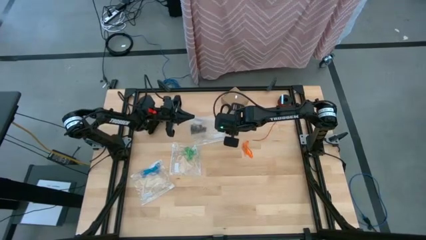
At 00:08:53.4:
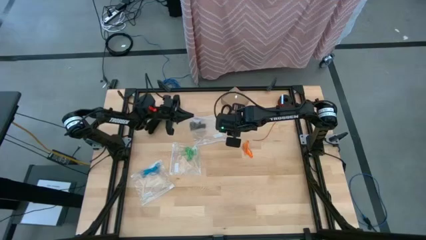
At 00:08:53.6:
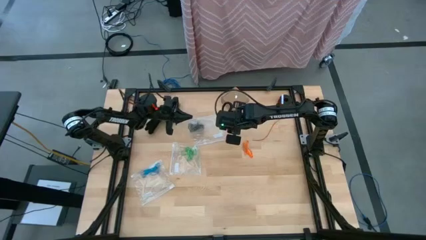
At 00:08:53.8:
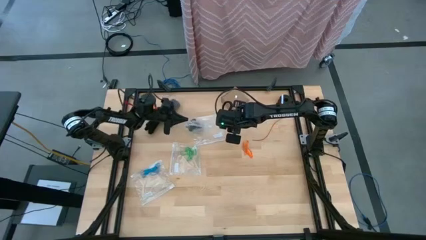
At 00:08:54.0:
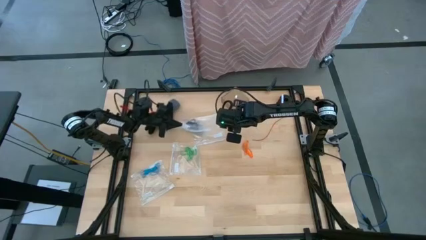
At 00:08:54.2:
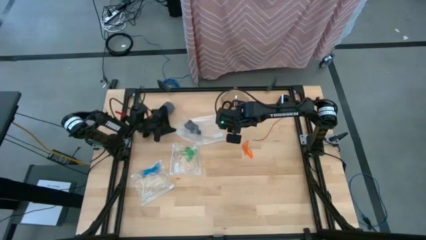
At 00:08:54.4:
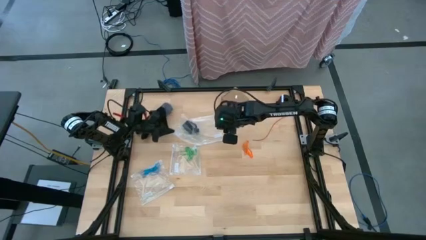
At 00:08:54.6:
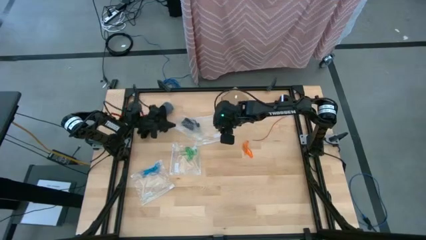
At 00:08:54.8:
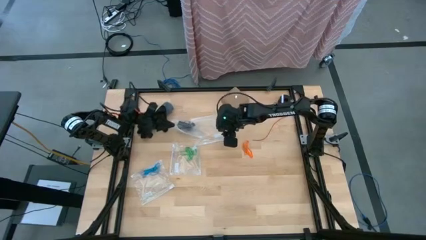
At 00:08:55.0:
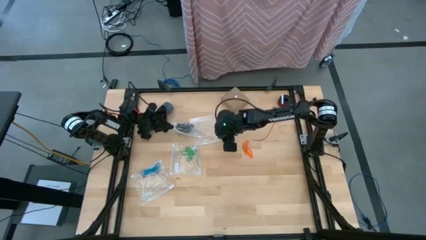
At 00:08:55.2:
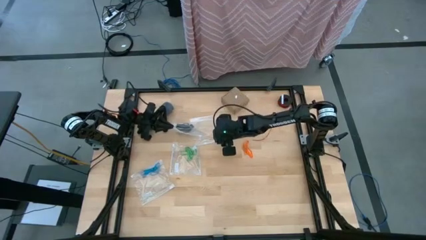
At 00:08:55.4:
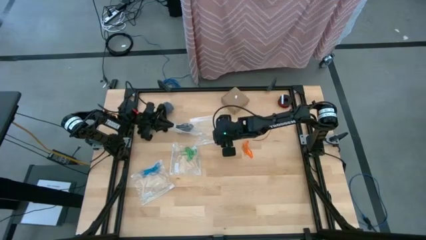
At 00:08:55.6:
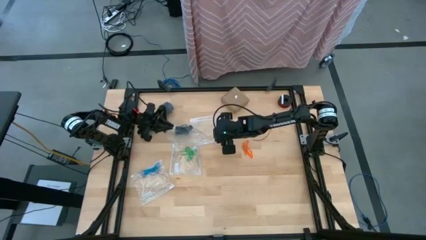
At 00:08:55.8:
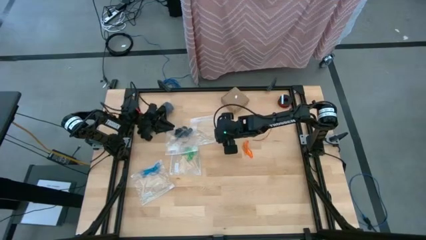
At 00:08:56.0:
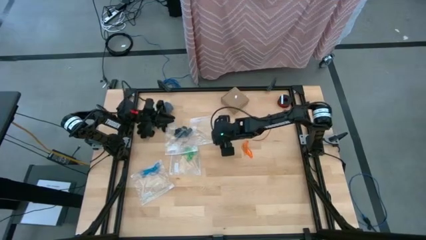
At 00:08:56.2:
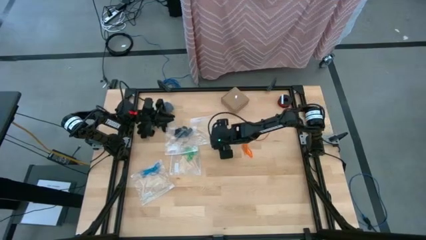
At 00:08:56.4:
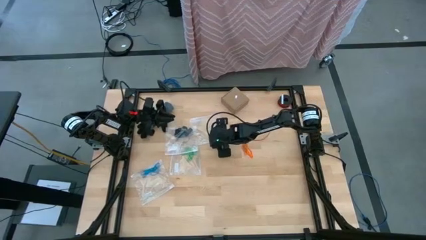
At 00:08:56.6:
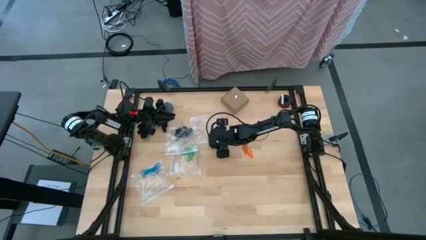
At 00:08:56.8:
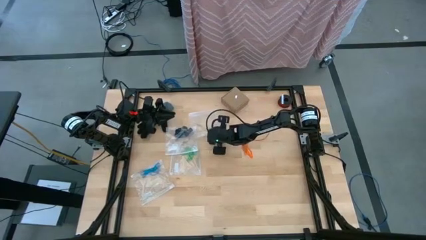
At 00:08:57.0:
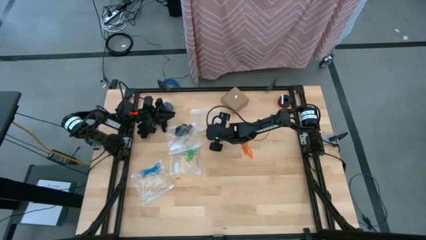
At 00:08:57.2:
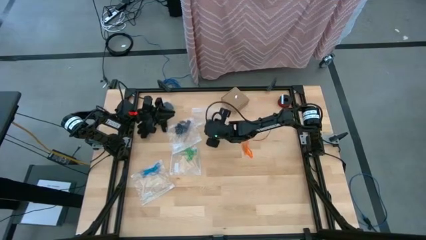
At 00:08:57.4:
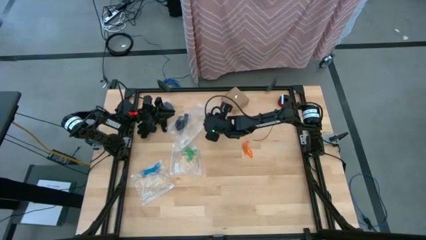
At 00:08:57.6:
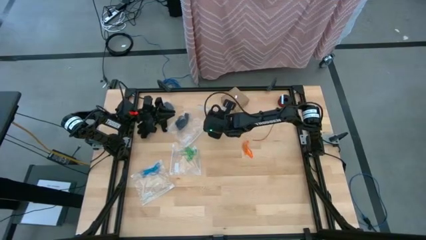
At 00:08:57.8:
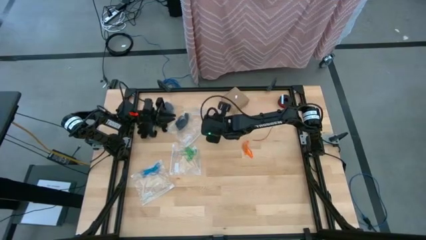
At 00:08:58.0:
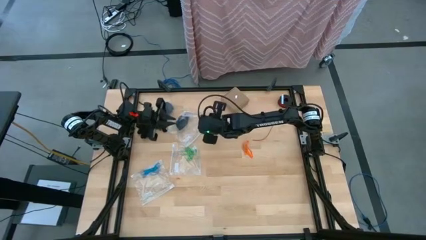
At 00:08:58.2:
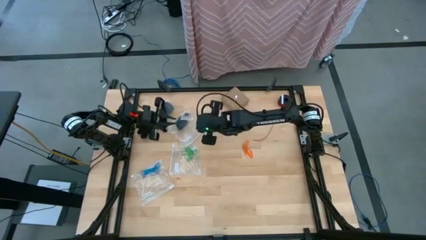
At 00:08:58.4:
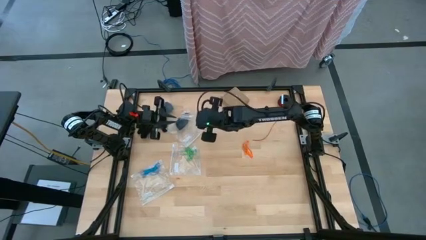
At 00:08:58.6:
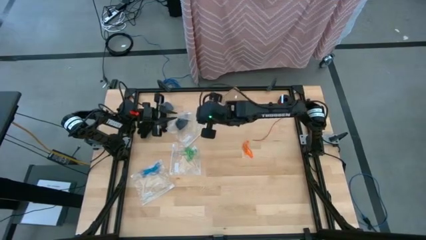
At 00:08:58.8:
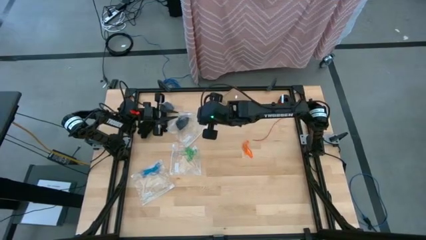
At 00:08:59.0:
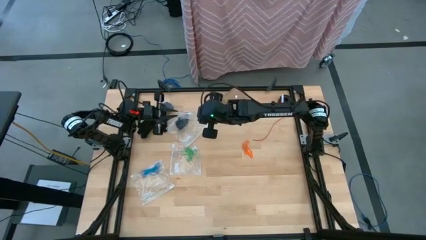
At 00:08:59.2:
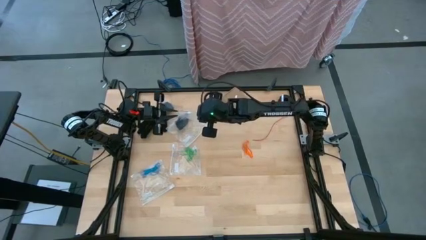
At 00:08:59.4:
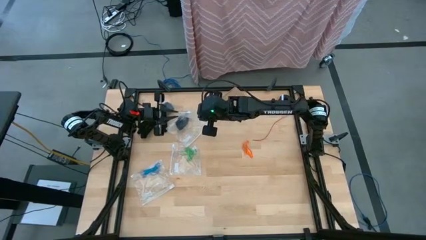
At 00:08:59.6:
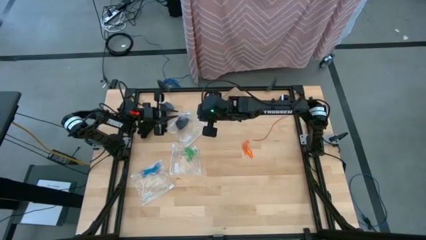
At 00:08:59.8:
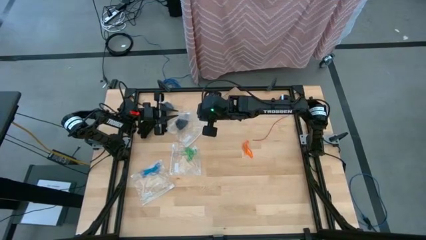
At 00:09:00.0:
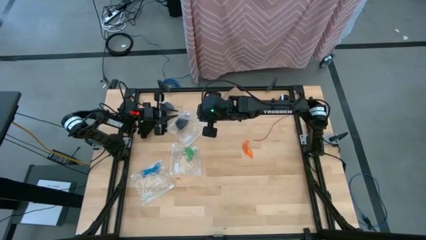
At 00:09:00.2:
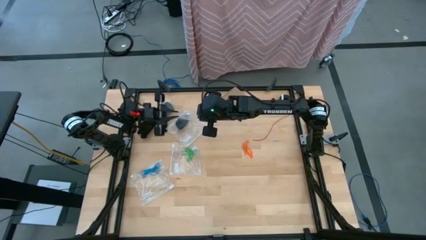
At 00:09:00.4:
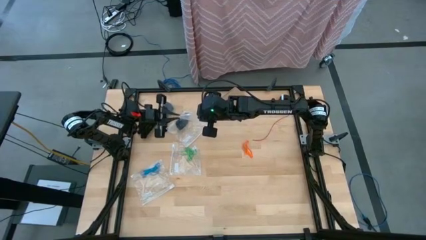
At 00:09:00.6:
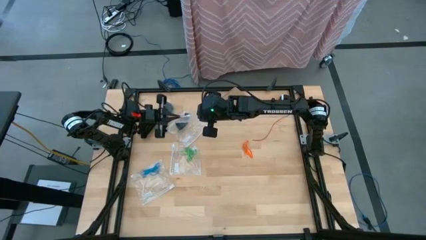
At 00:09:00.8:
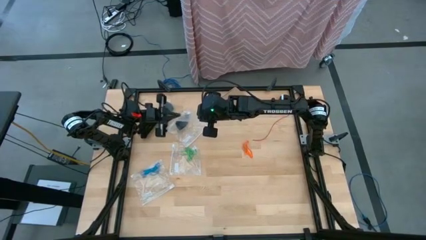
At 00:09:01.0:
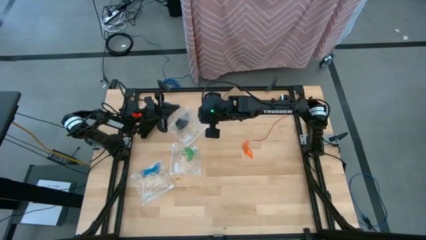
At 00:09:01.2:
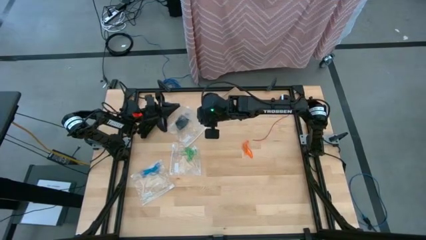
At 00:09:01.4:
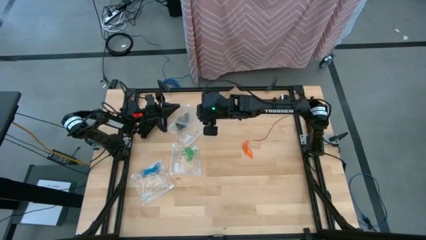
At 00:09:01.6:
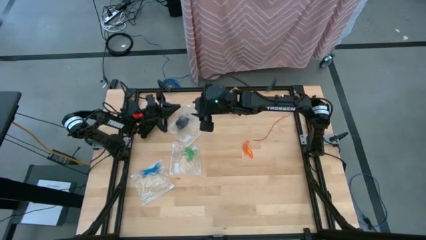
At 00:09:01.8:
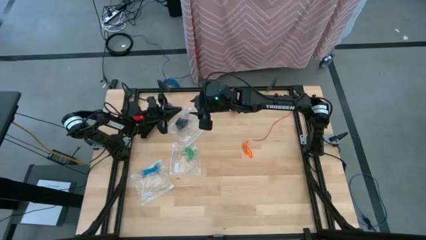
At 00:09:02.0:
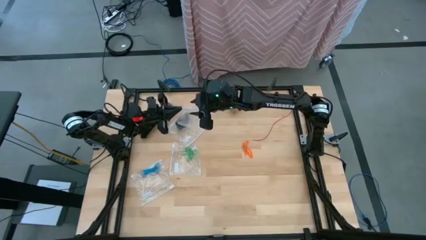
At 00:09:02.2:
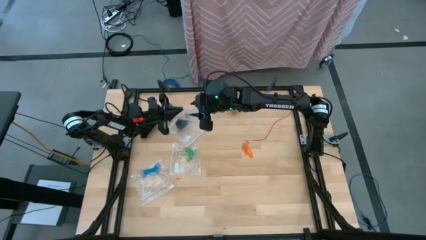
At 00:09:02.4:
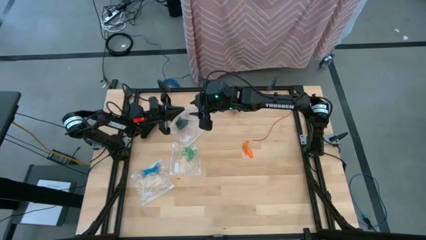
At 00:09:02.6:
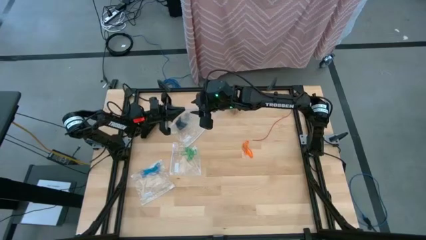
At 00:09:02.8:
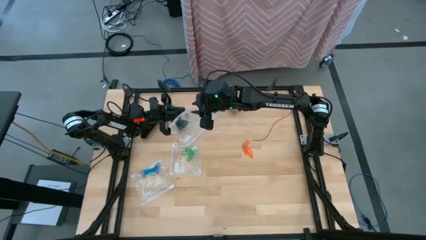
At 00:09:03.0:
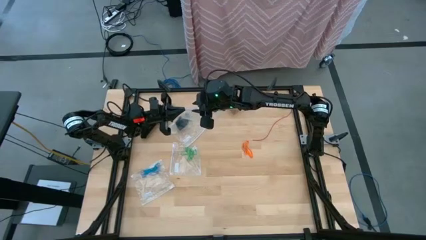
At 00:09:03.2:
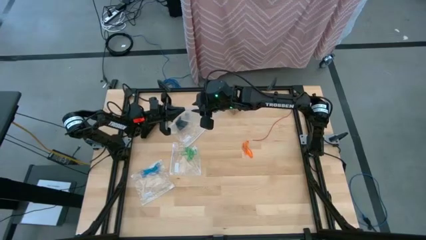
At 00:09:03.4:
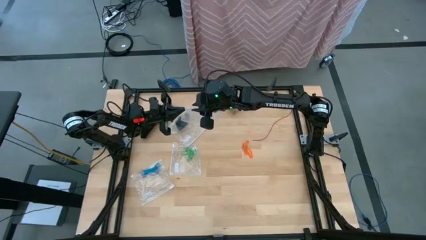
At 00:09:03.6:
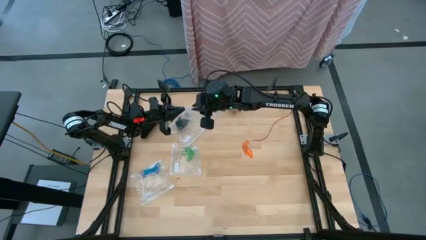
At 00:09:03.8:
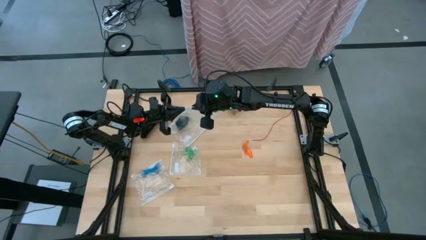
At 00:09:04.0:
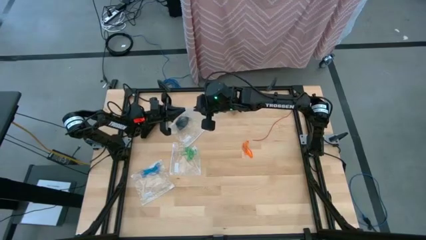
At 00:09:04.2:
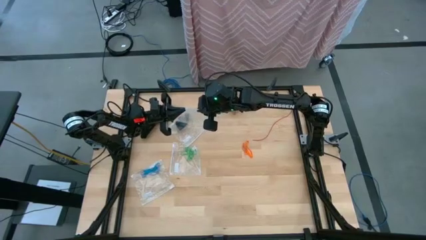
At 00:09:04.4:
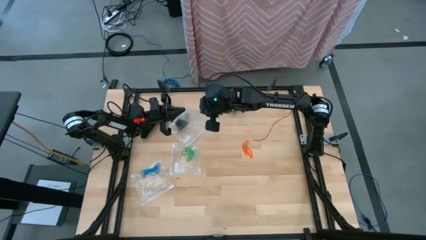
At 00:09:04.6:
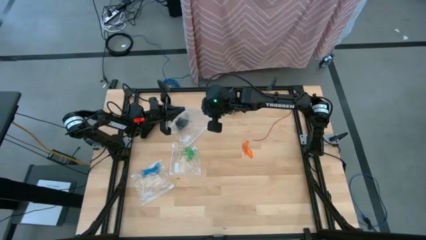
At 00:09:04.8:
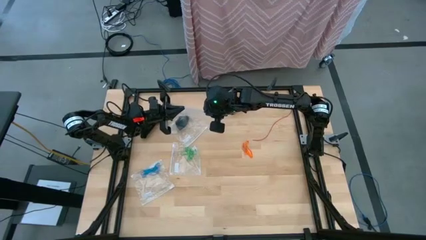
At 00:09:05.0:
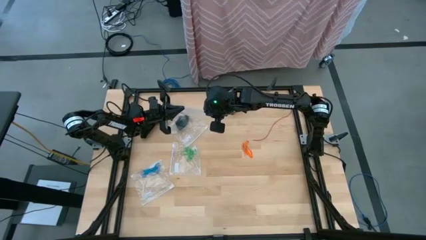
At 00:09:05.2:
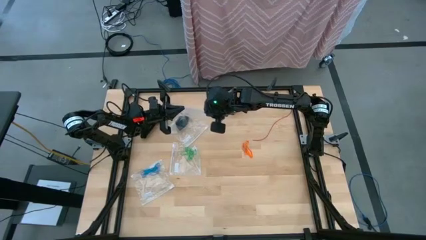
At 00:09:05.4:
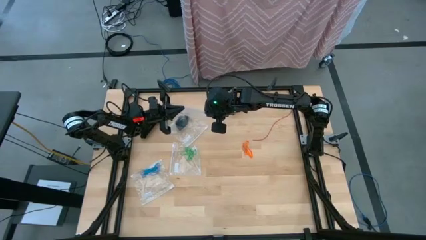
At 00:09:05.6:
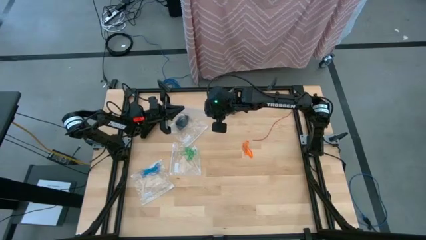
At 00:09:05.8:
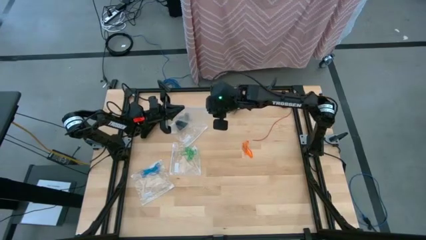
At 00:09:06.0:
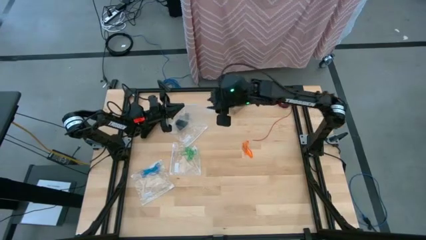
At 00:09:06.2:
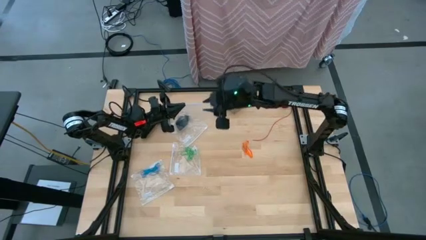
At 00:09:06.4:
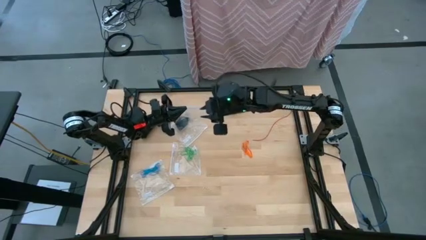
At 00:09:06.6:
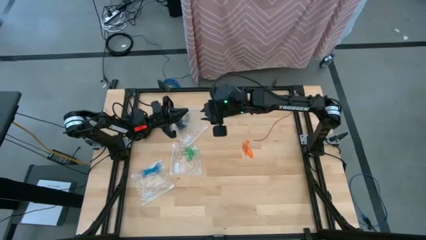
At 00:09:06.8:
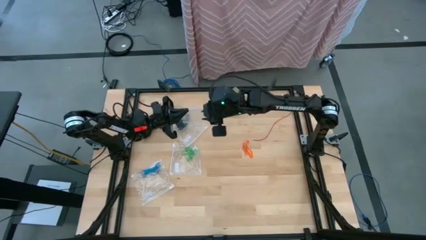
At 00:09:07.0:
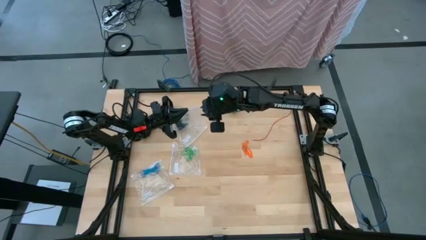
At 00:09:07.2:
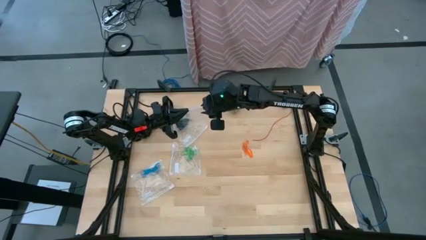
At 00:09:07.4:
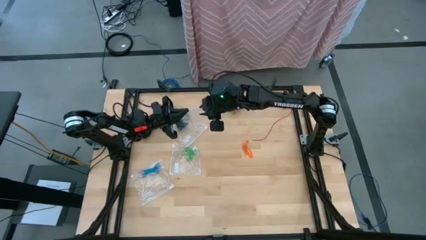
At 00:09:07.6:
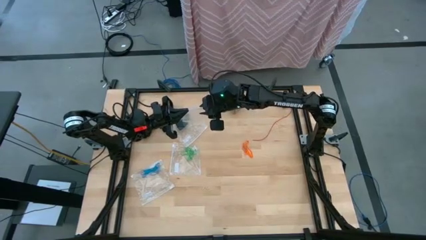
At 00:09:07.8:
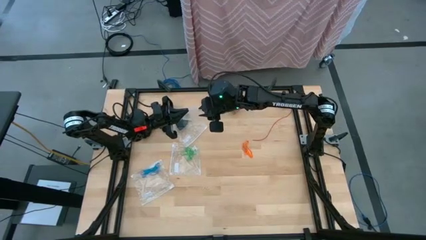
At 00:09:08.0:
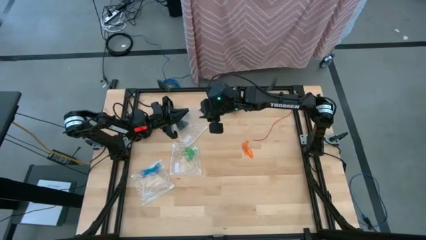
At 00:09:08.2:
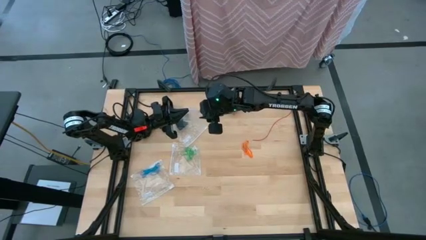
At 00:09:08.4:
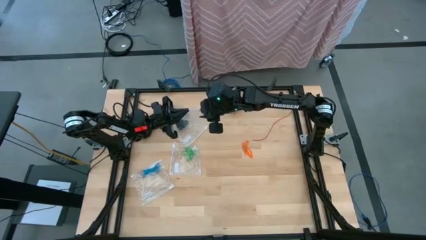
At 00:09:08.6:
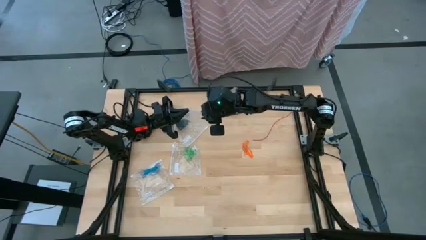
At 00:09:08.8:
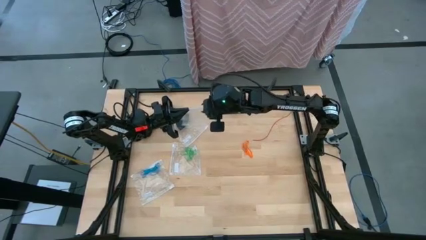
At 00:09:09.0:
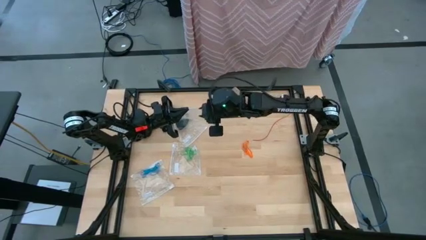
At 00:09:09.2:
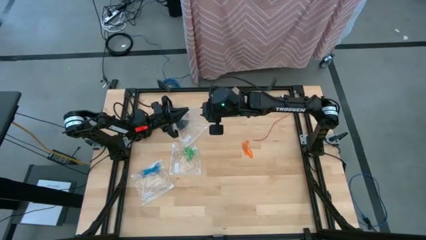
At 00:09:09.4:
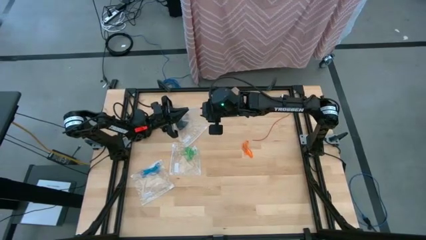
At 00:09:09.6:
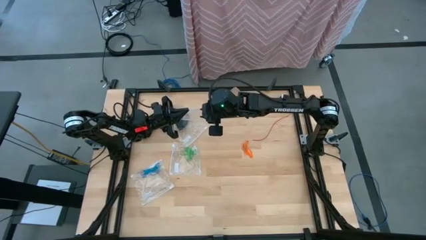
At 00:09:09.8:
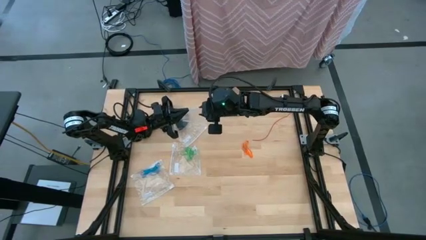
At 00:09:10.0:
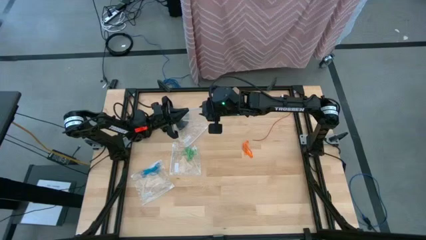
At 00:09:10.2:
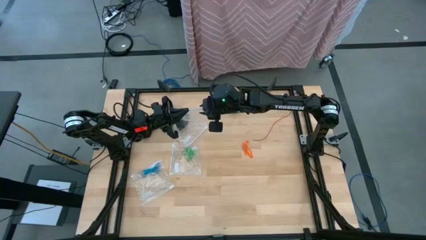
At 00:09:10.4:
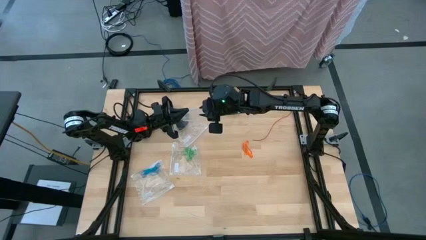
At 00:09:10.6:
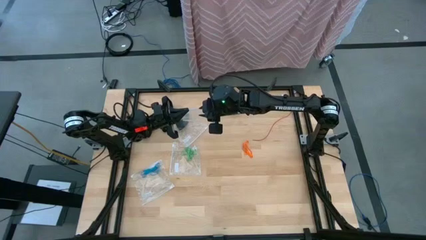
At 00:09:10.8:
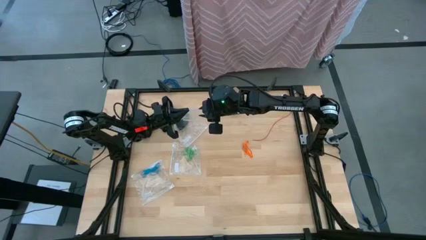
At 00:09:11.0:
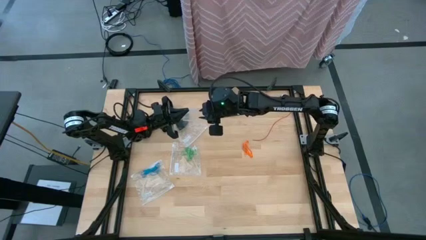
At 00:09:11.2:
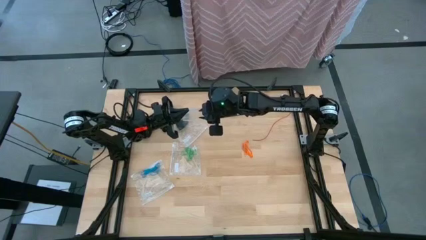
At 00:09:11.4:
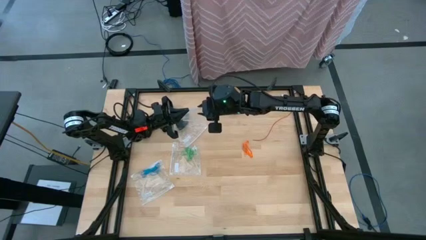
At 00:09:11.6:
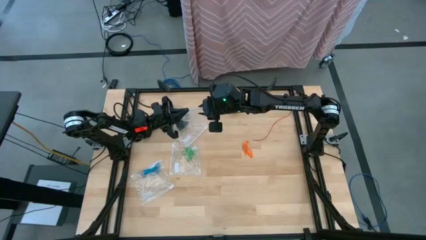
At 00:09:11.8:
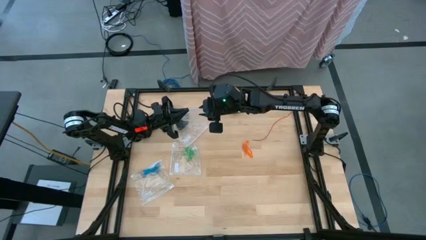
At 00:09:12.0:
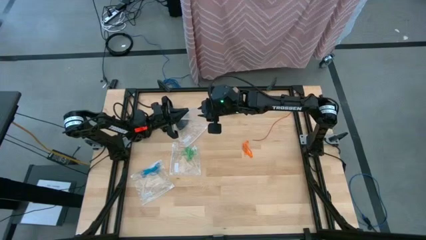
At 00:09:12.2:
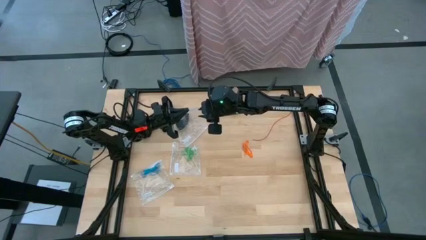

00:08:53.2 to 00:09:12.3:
Task: Sort rubber bands
Open the transparent zip bag
